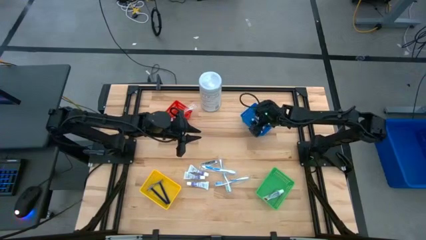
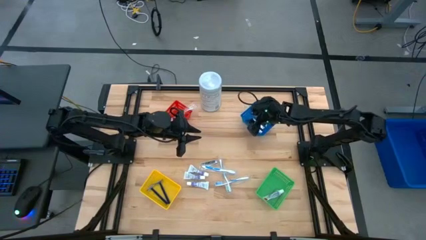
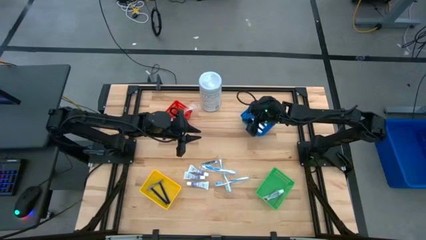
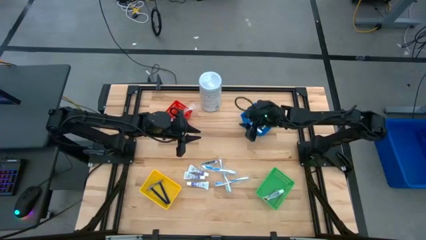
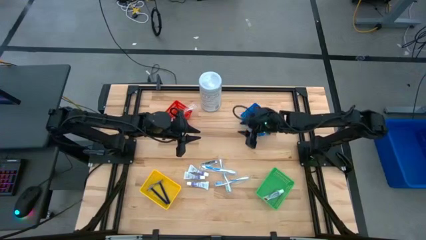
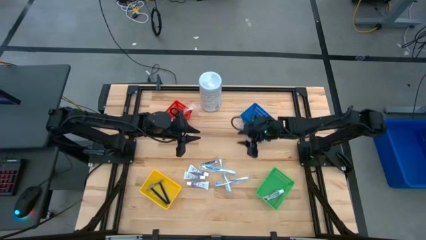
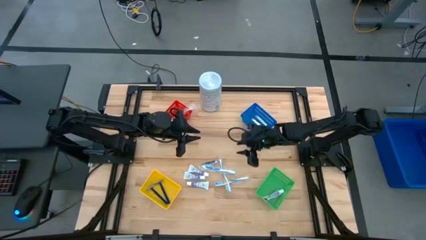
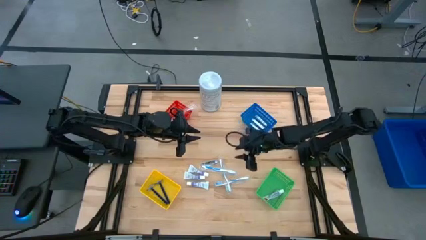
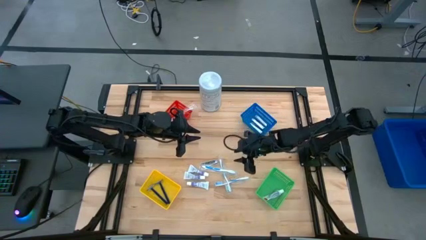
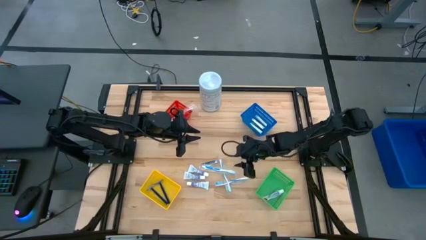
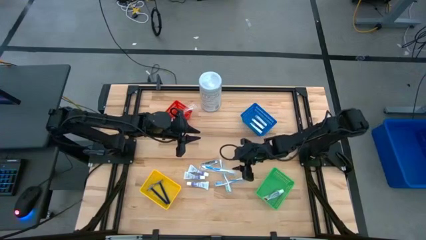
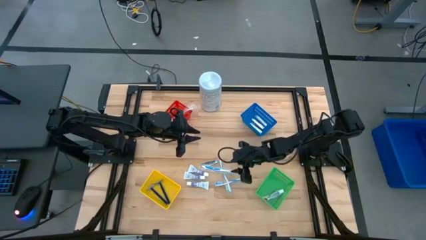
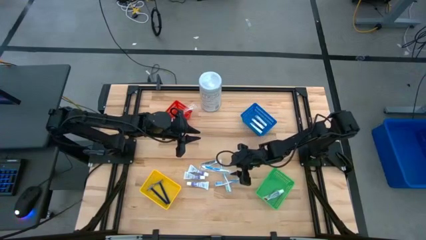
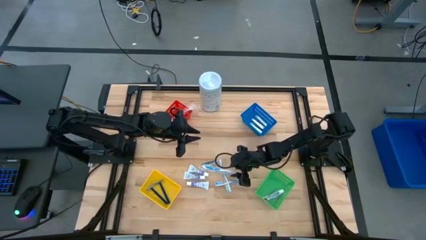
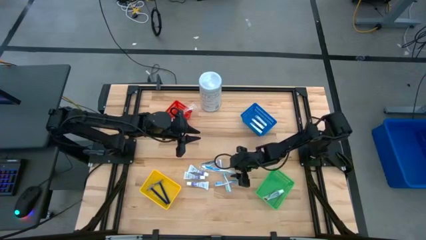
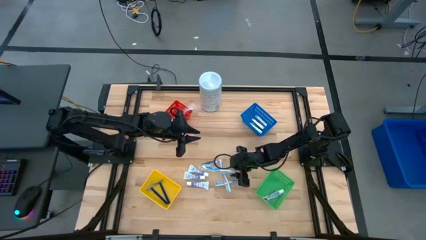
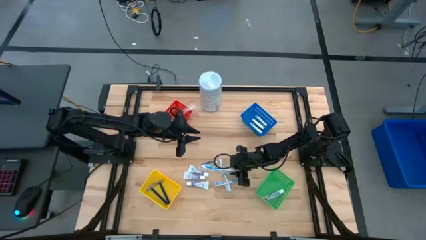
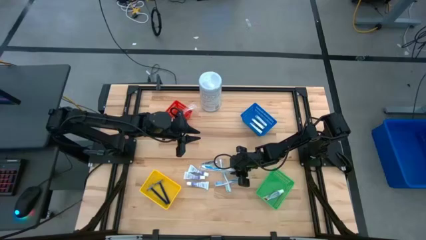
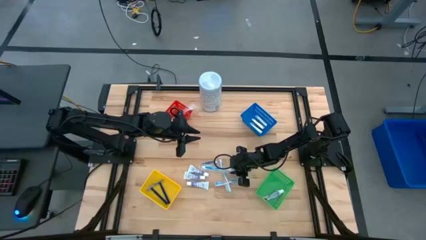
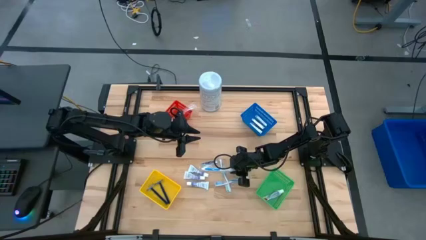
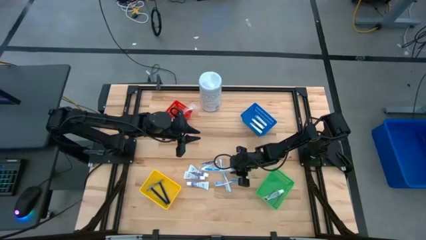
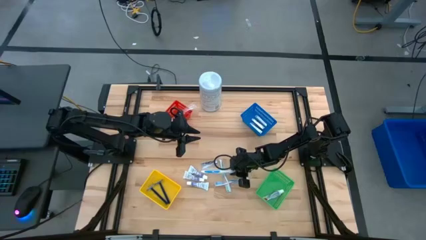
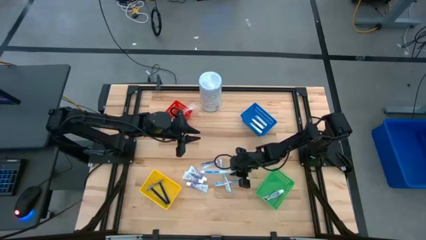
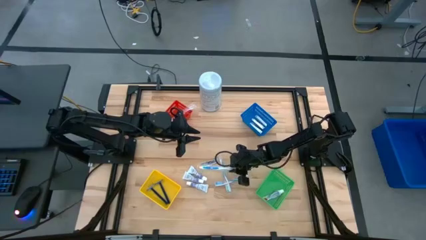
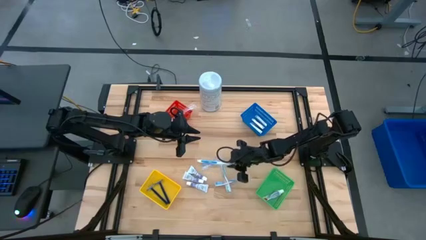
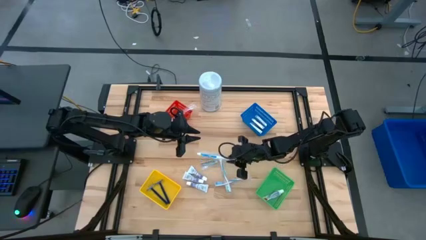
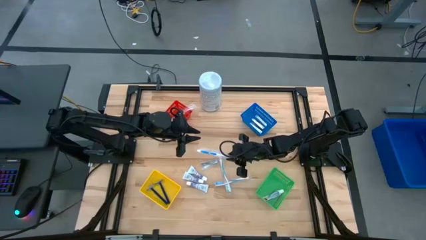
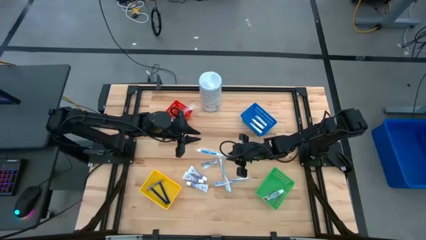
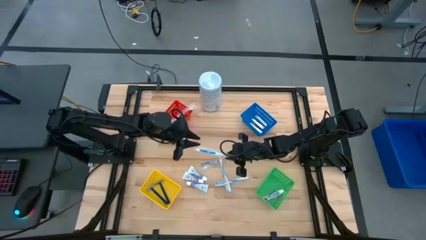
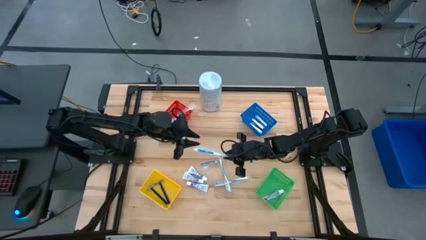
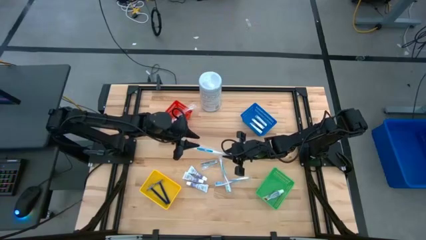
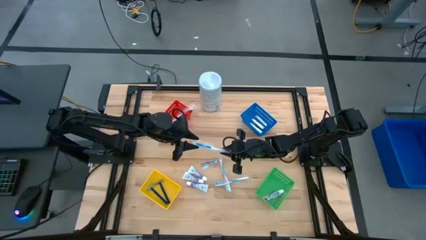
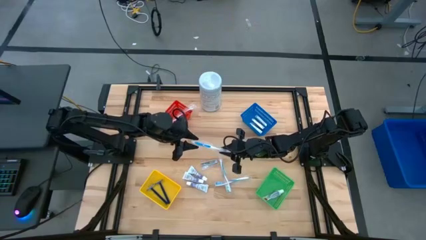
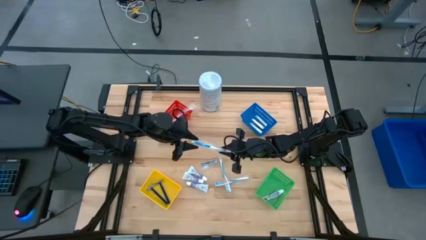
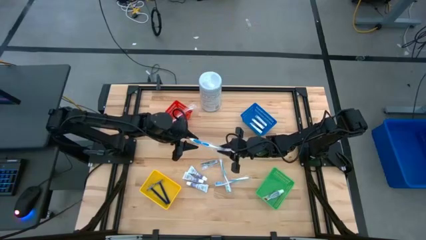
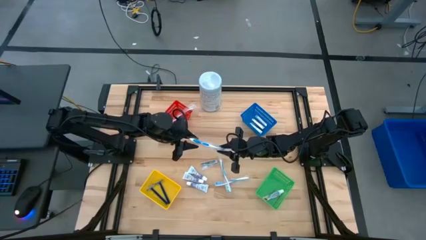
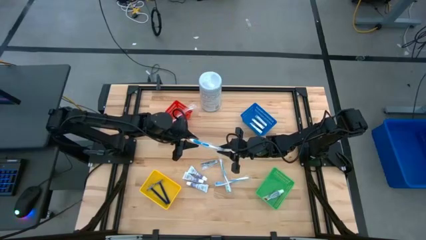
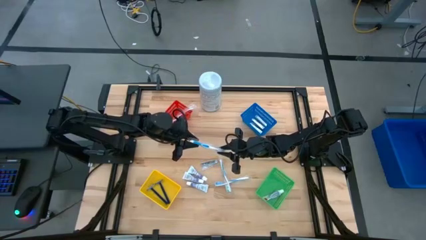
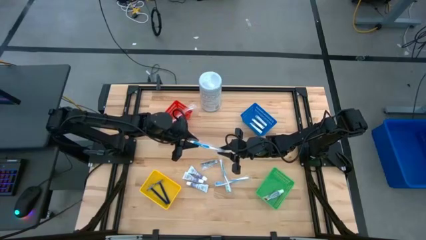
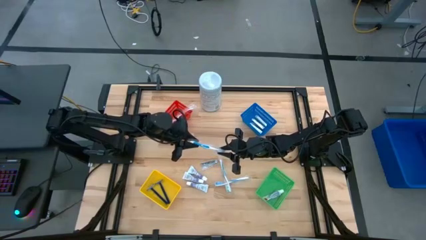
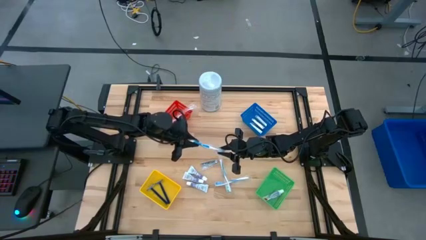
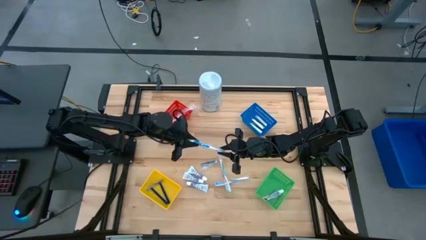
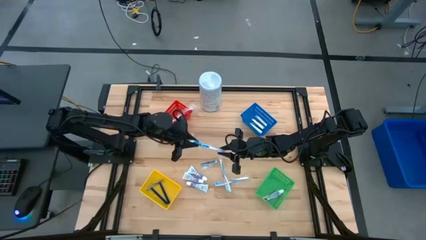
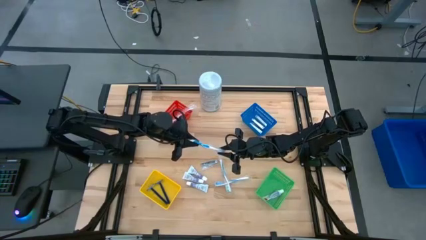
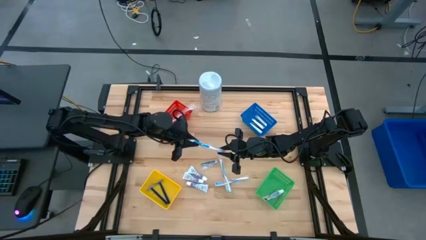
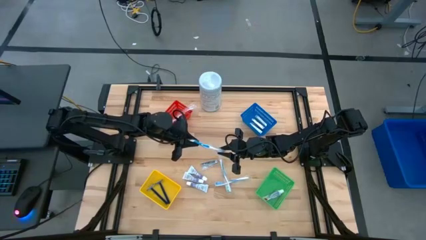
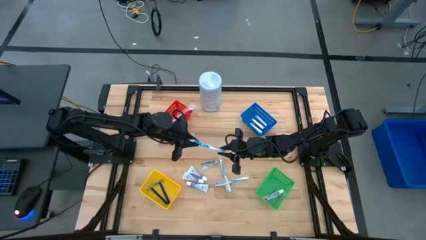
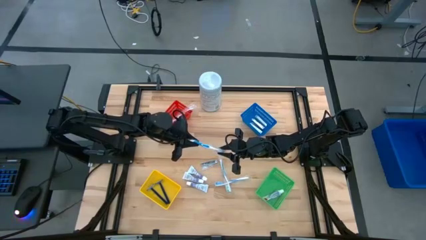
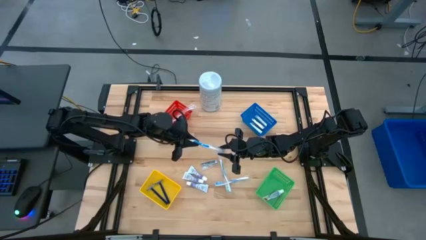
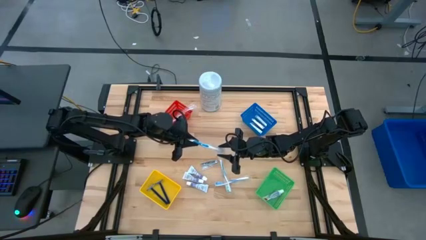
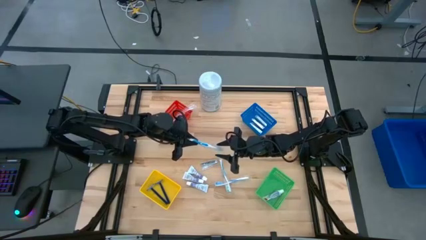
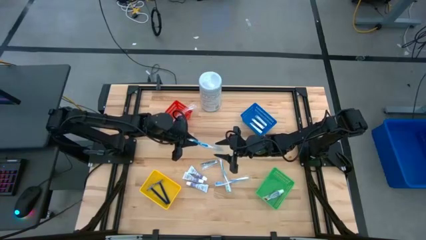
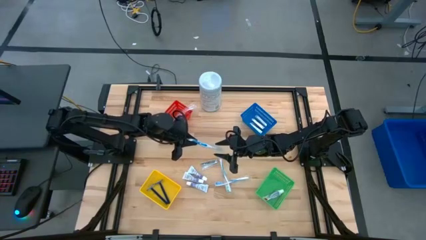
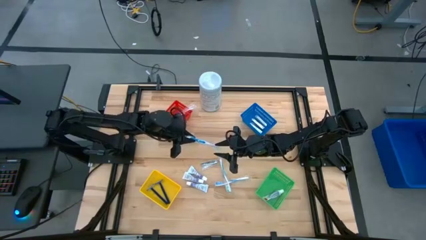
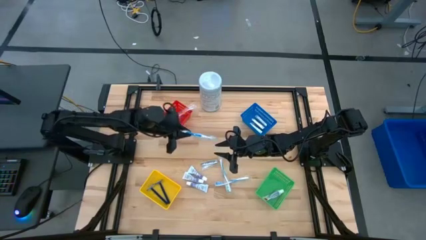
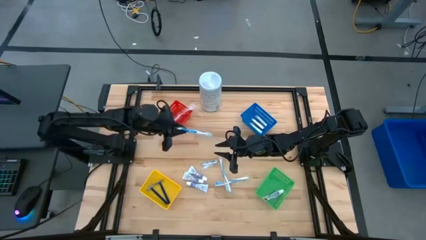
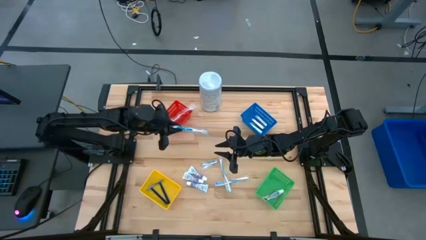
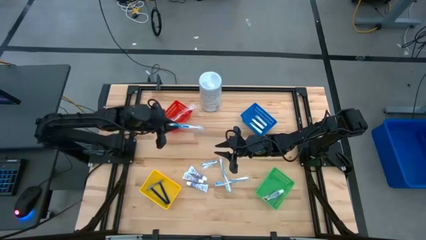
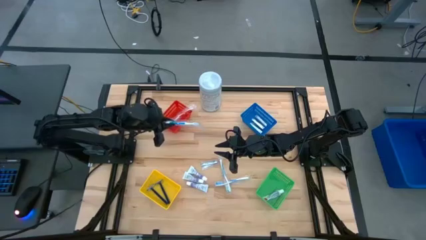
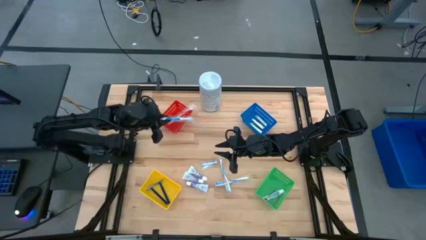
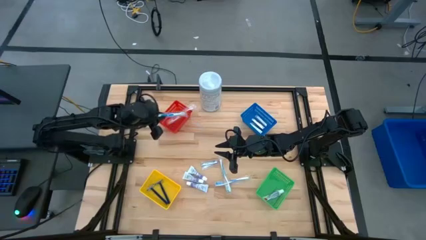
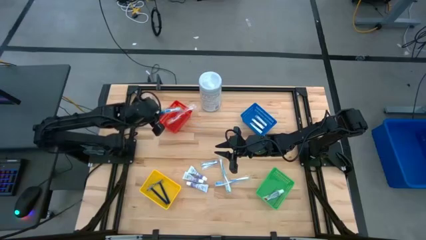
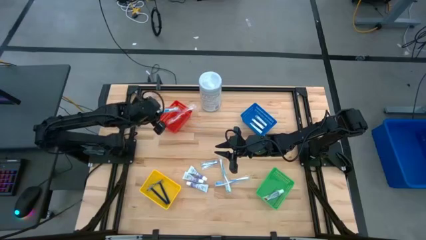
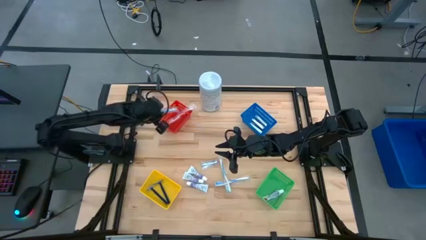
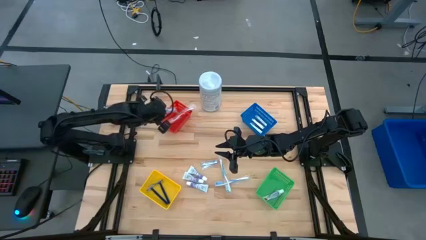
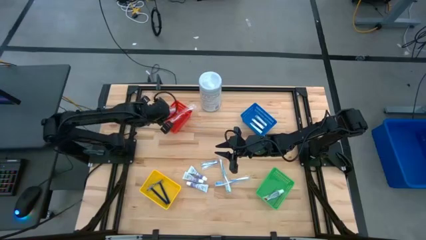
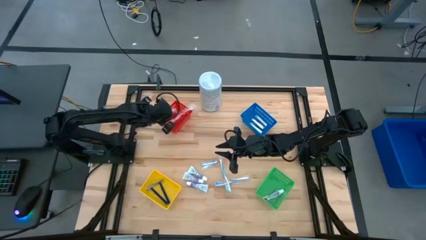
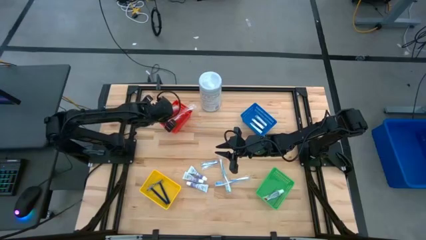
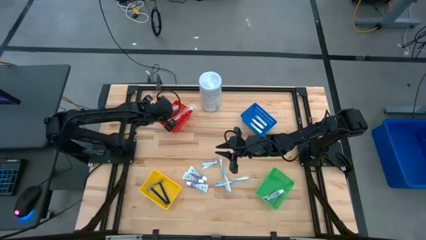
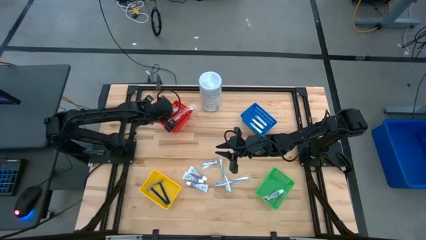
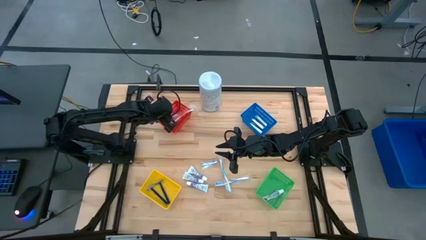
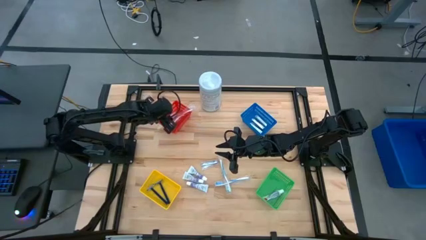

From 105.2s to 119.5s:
Task: Pick & Place Travel size toiletries
Put the blue toothbrush into the orange basket
